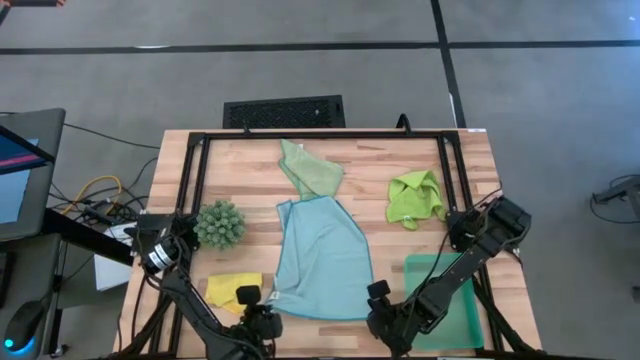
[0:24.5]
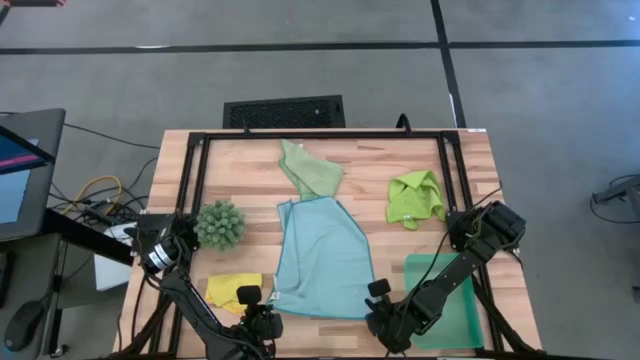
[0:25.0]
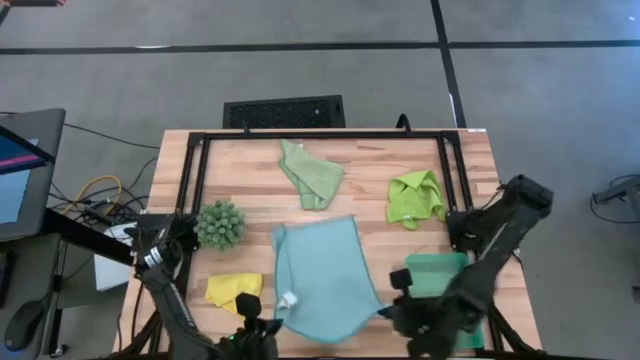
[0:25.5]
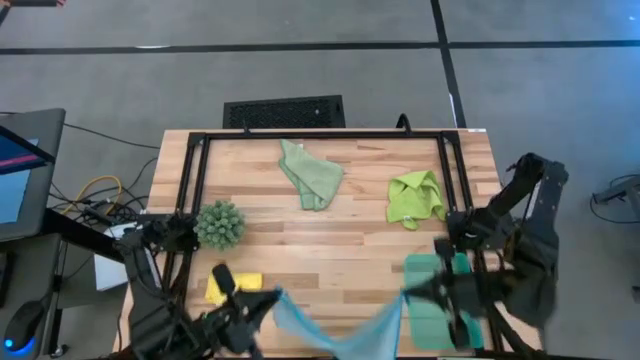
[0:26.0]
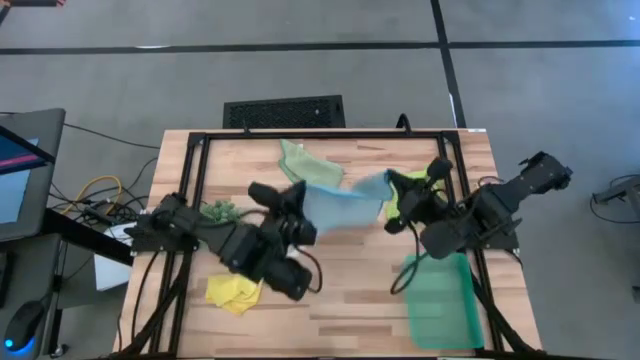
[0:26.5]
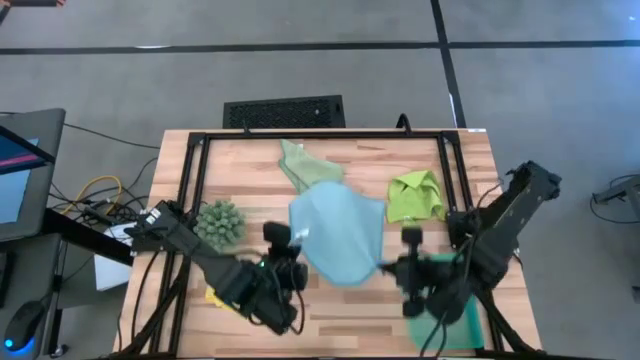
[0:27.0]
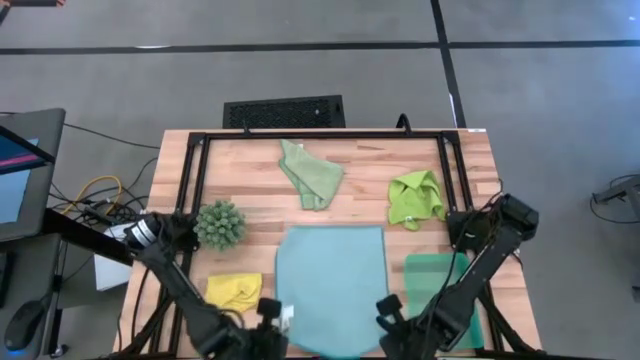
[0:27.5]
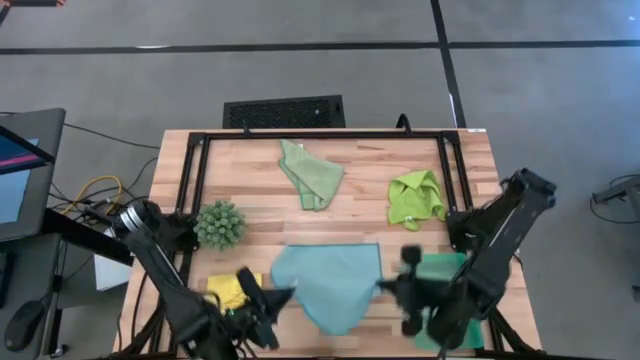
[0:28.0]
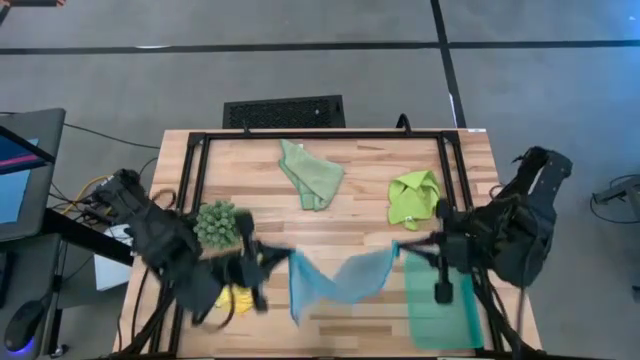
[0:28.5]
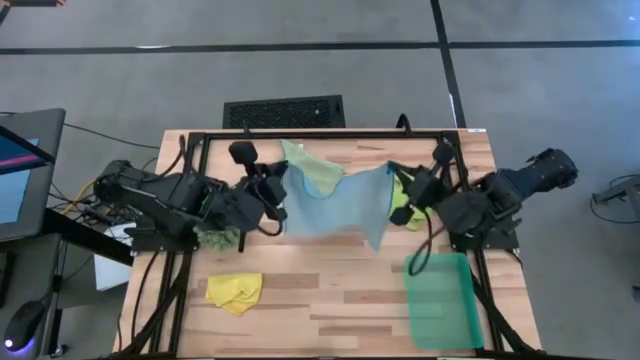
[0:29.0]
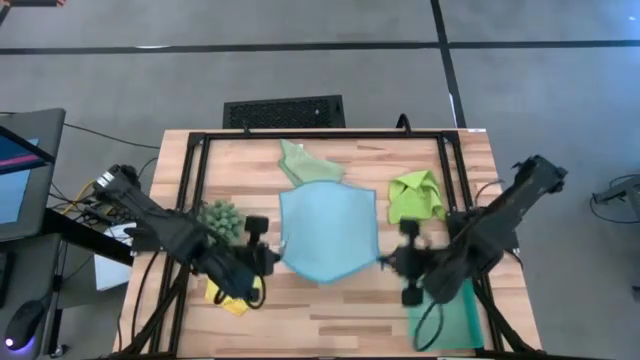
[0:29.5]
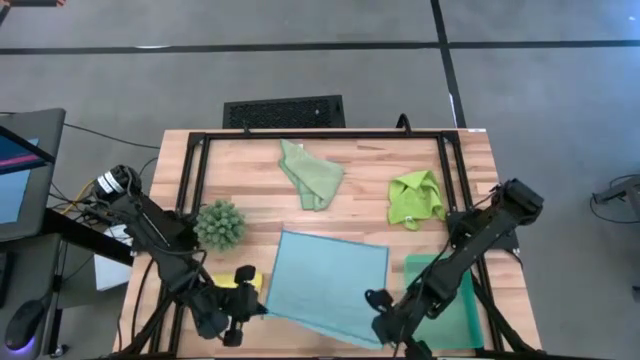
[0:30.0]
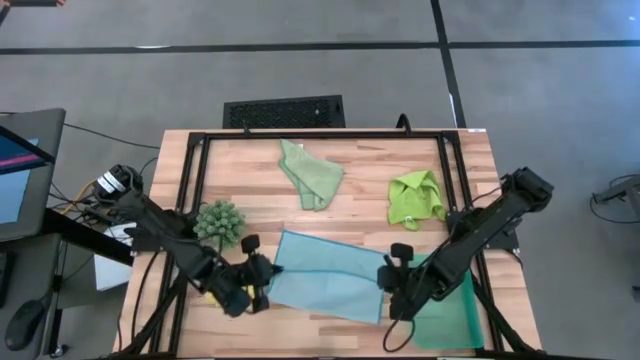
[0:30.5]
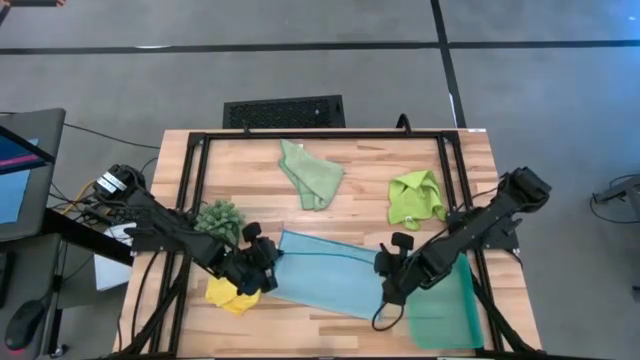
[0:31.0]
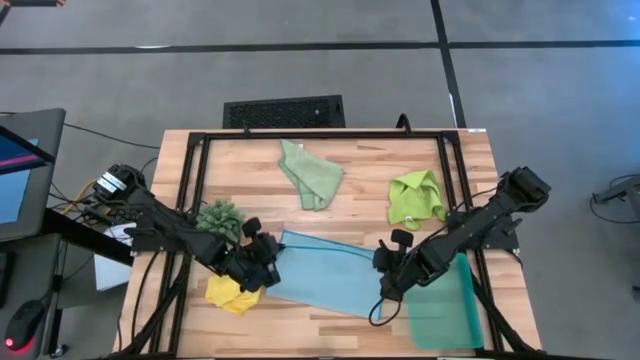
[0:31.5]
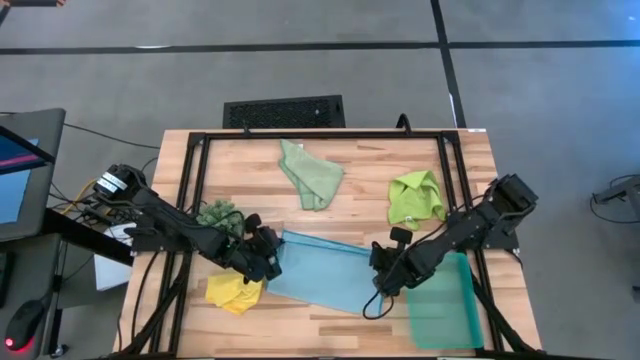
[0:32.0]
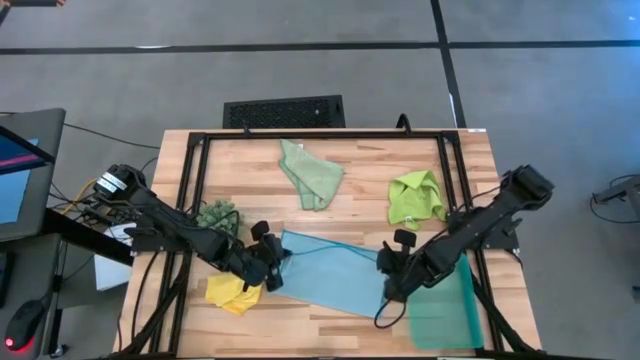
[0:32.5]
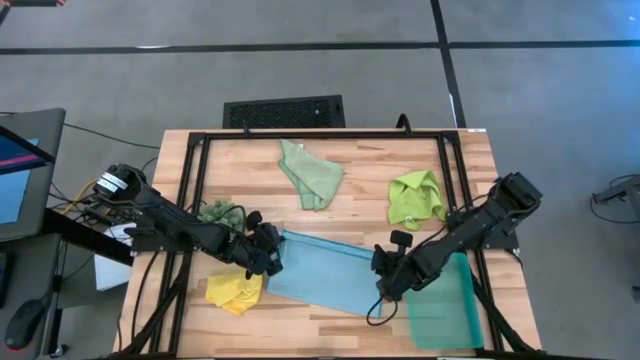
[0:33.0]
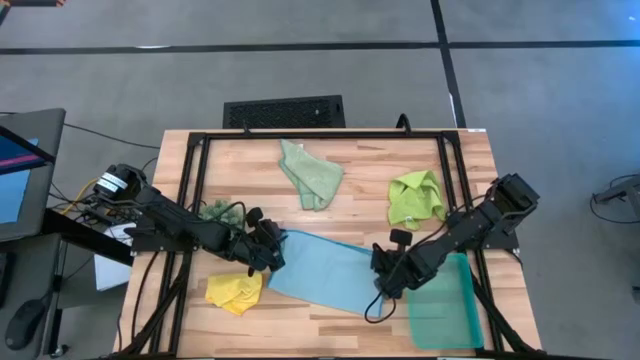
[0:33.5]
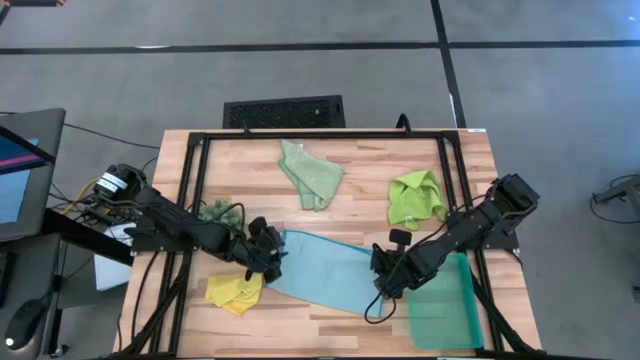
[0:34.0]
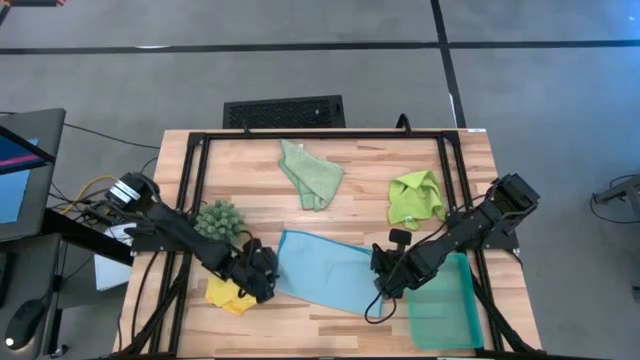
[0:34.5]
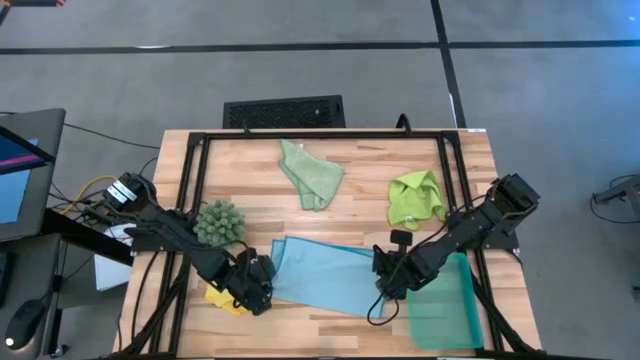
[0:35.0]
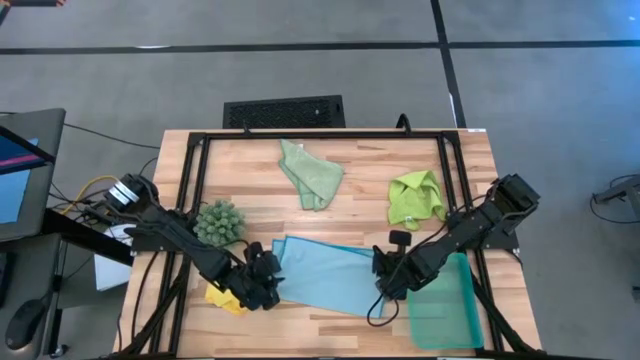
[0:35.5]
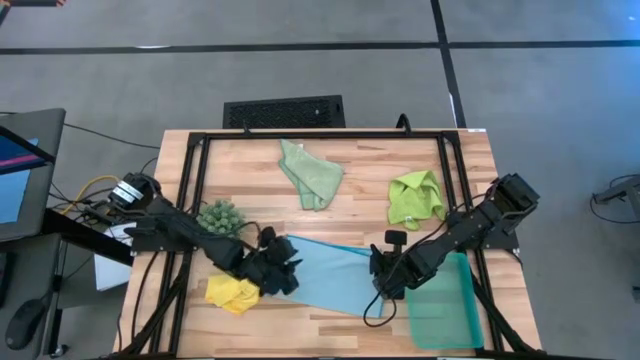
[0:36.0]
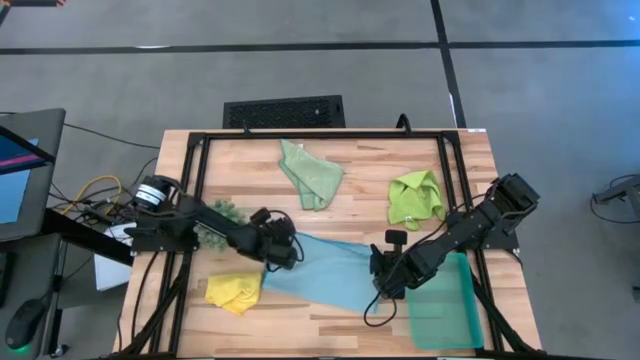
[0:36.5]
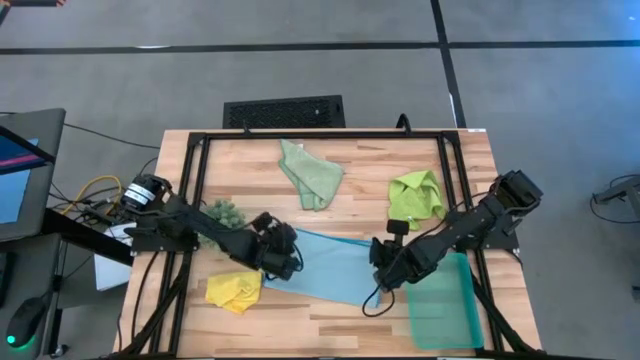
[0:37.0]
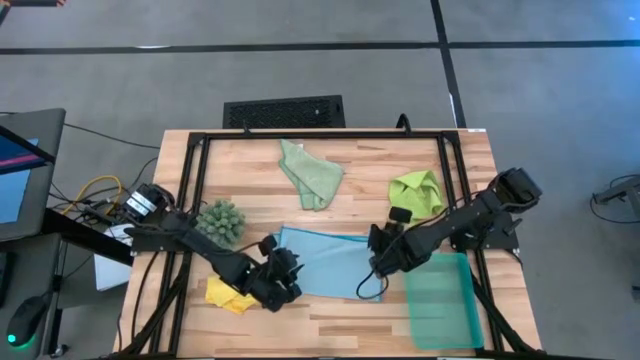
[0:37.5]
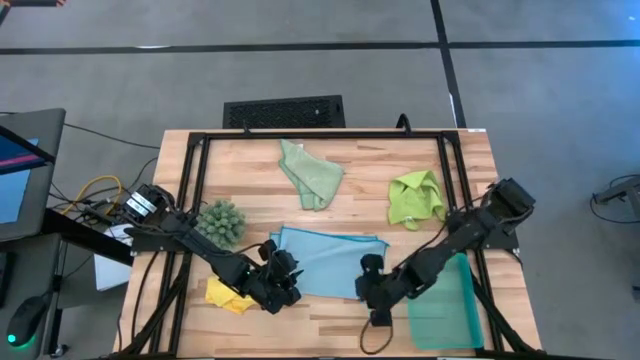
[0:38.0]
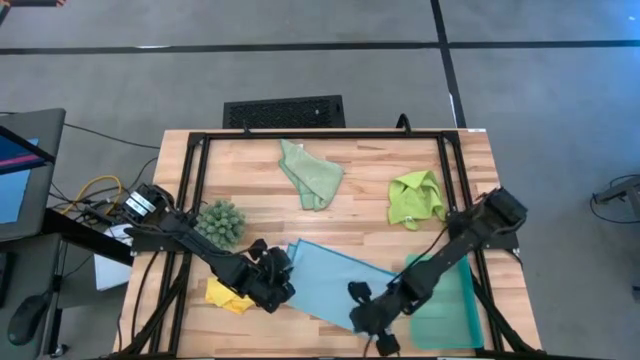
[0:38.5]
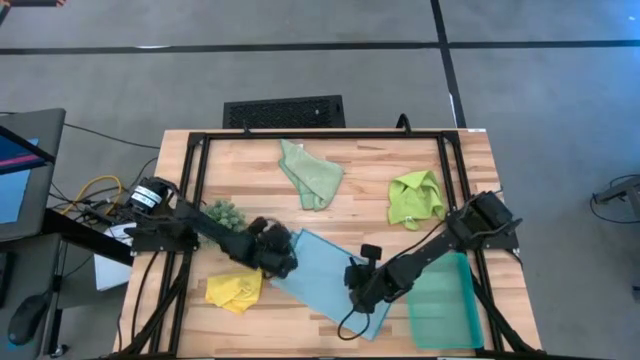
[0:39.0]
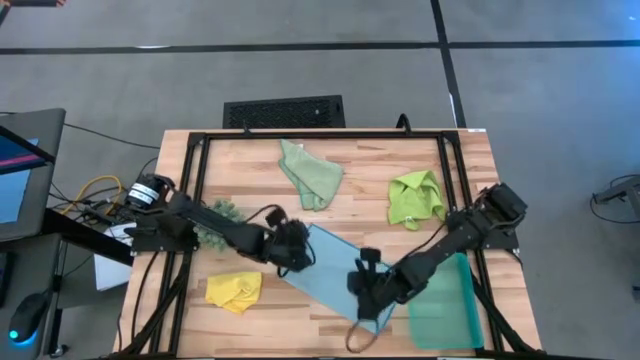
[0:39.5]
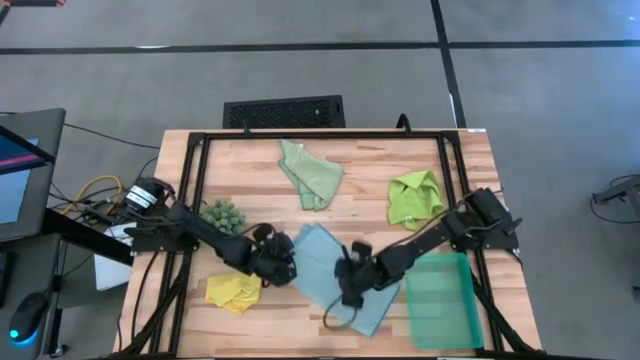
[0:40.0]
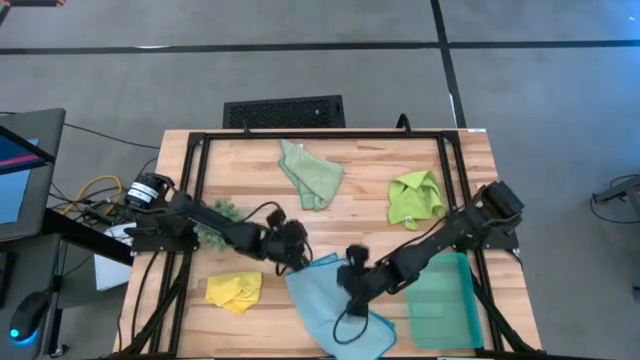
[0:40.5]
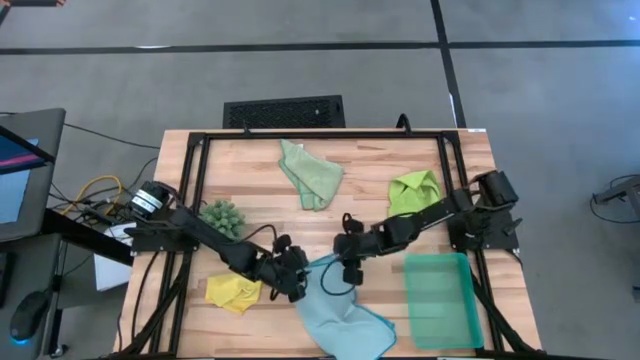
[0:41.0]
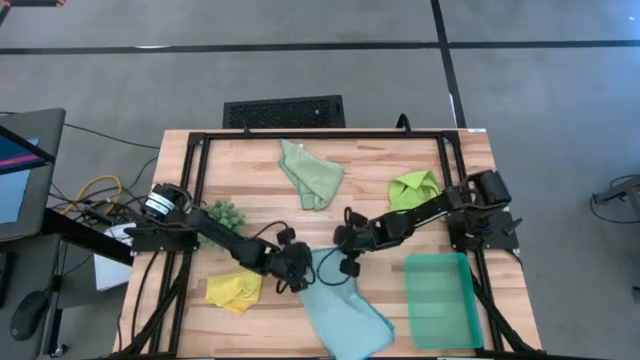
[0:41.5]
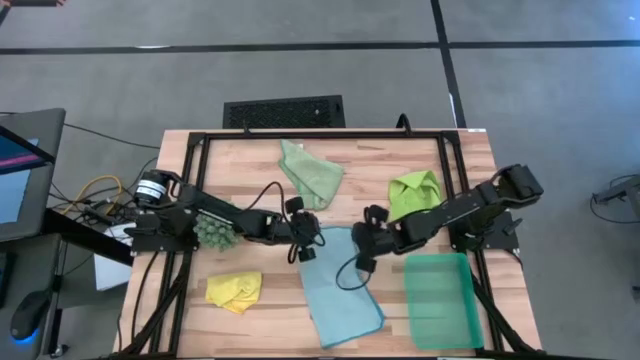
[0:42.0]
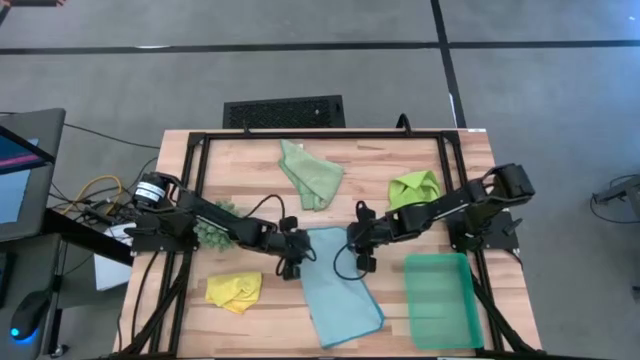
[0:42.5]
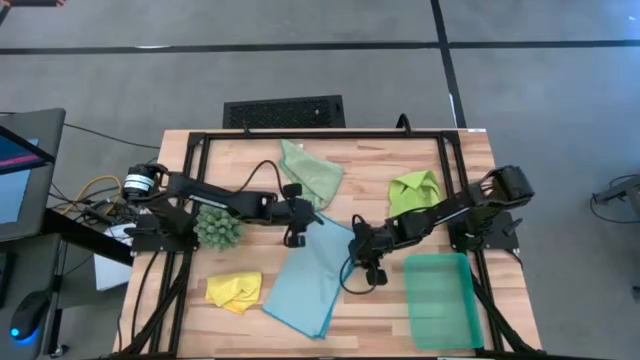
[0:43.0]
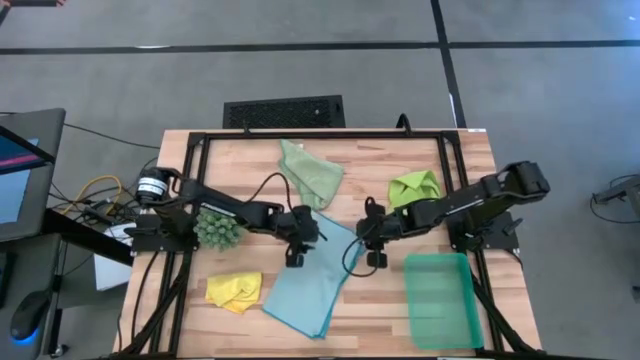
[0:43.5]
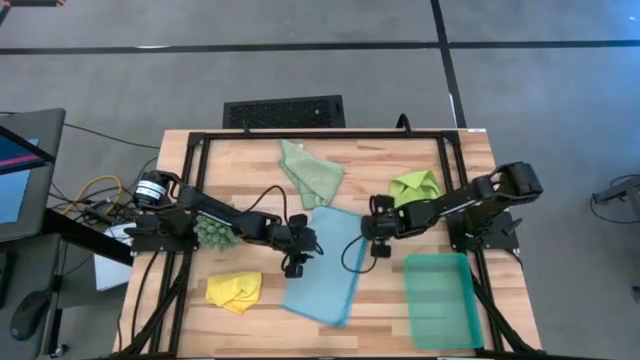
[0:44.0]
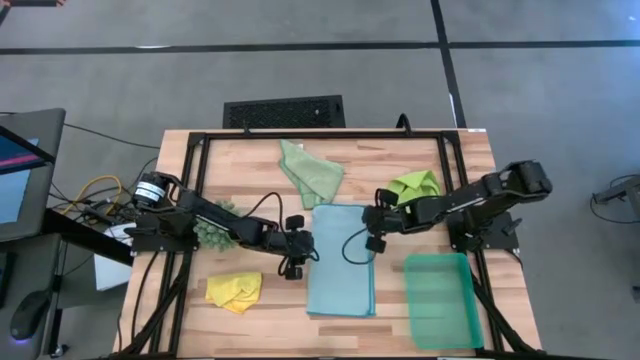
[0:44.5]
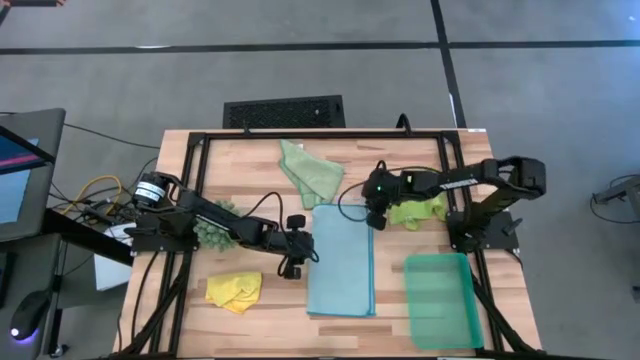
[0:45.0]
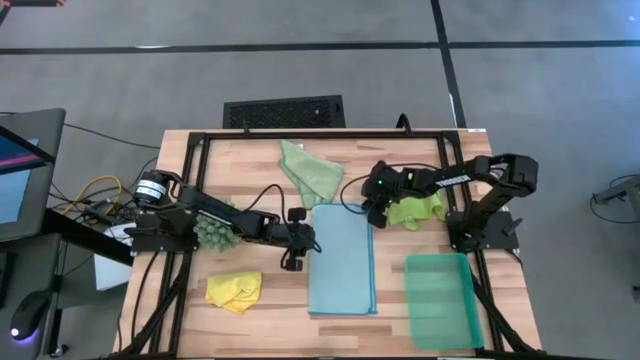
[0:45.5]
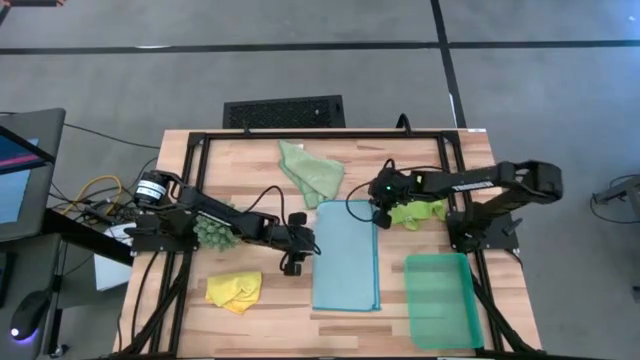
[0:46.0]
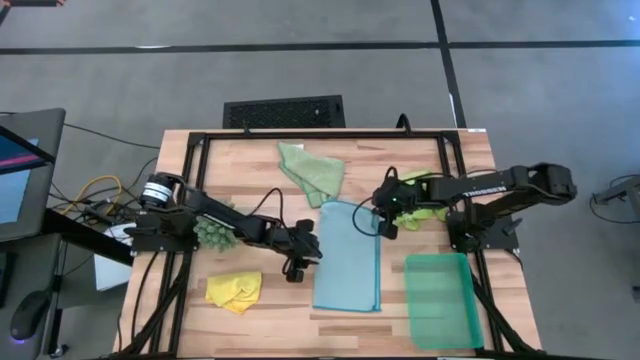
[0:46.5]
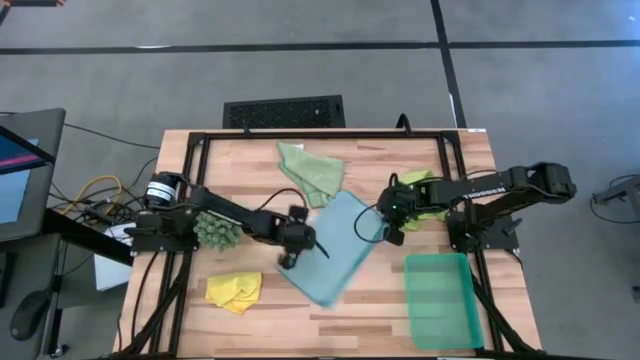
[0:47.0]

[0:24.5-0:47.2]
Task: Fold microfiber towels
Fold the blue microfiber cloth
